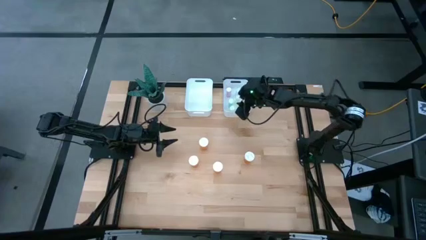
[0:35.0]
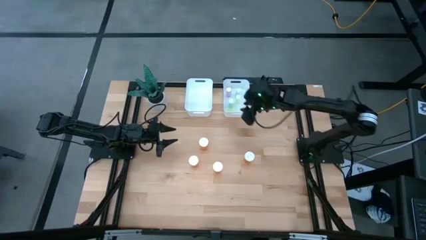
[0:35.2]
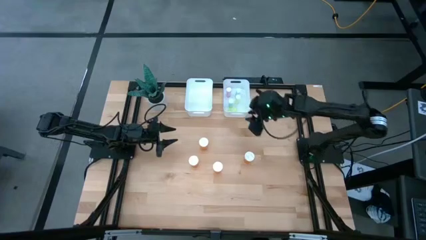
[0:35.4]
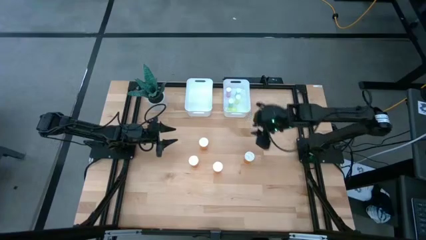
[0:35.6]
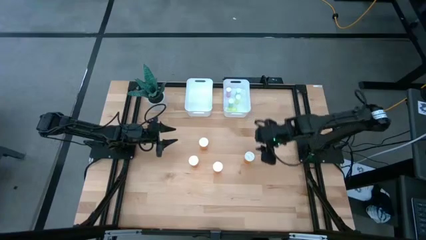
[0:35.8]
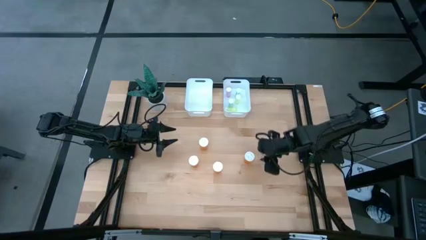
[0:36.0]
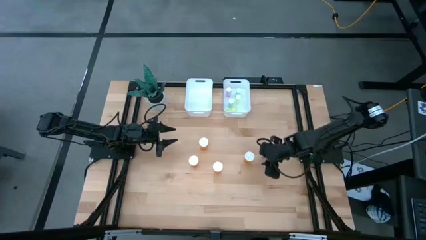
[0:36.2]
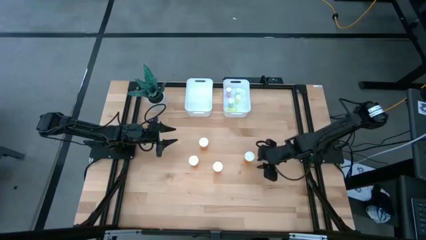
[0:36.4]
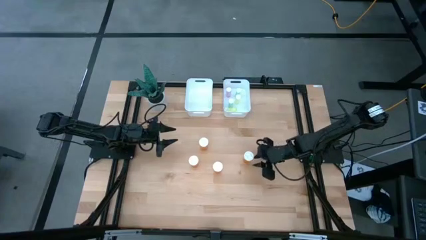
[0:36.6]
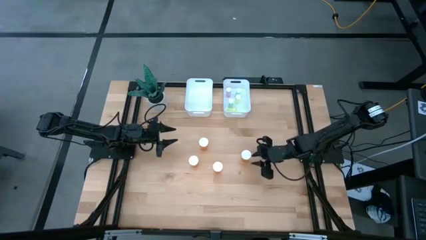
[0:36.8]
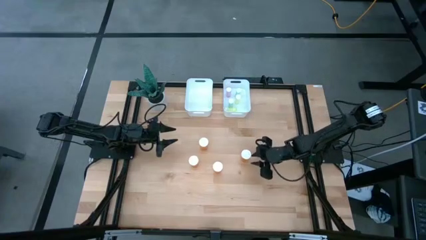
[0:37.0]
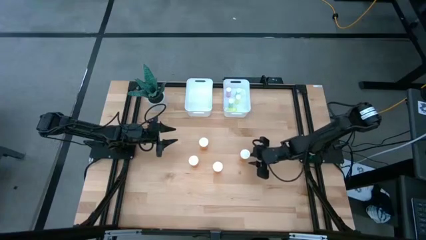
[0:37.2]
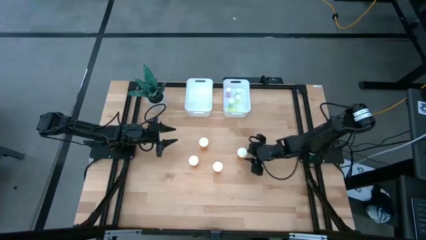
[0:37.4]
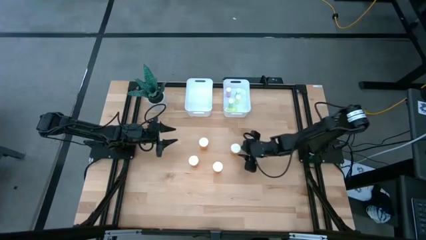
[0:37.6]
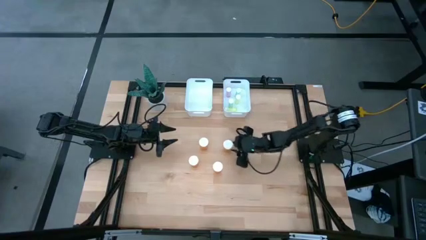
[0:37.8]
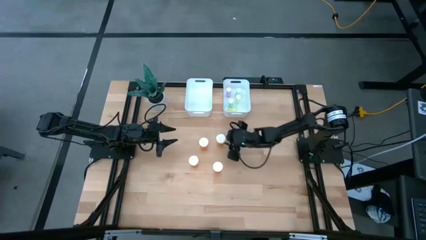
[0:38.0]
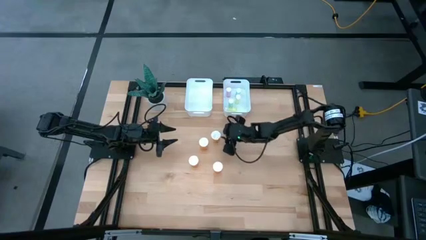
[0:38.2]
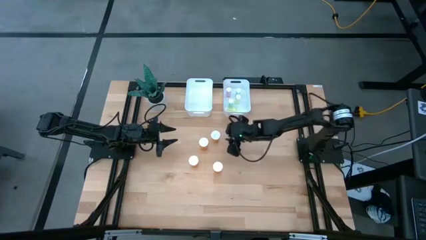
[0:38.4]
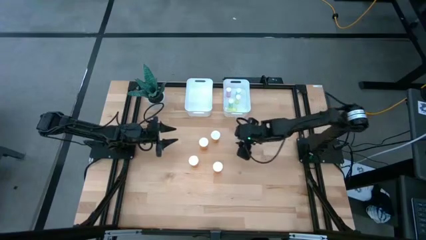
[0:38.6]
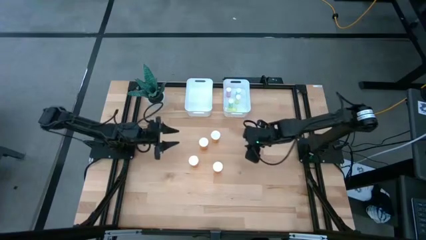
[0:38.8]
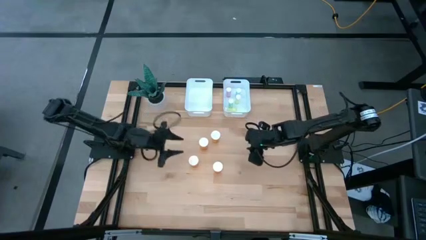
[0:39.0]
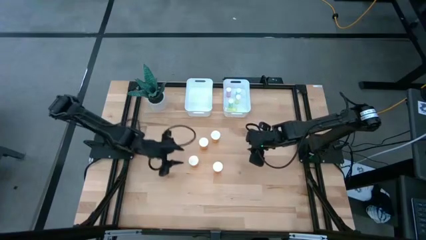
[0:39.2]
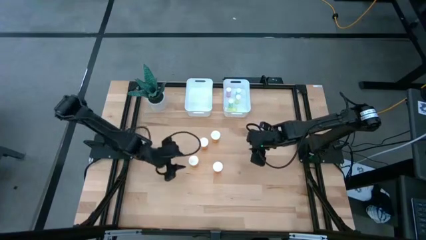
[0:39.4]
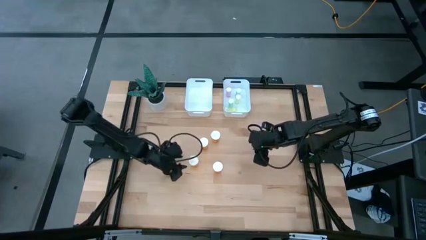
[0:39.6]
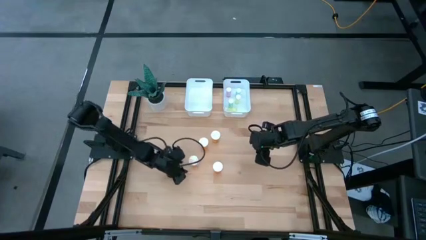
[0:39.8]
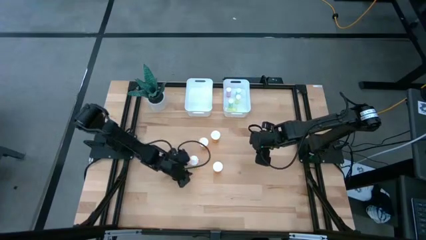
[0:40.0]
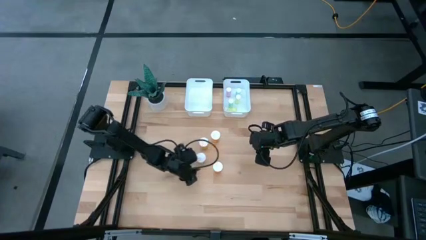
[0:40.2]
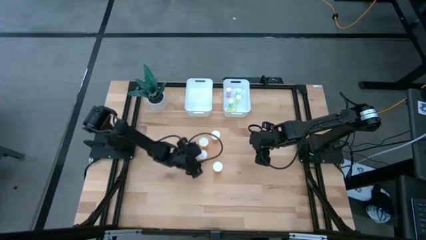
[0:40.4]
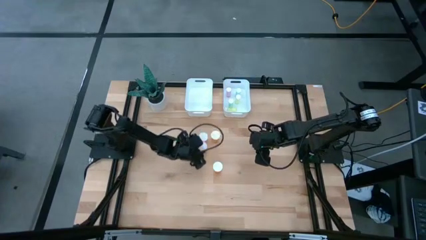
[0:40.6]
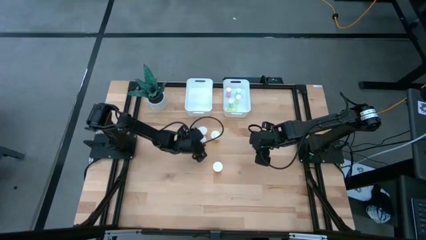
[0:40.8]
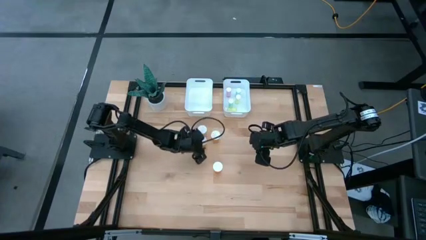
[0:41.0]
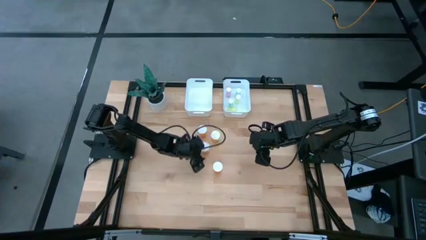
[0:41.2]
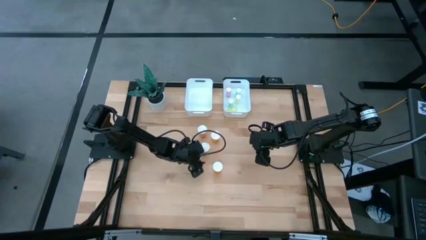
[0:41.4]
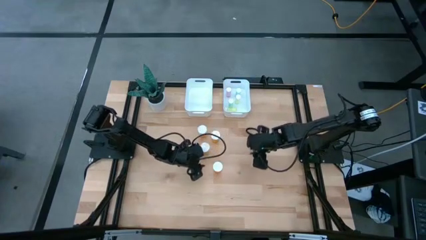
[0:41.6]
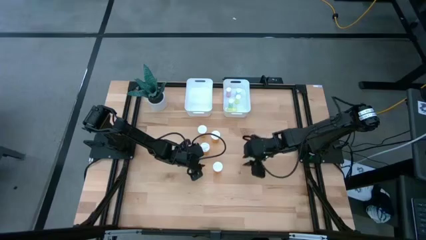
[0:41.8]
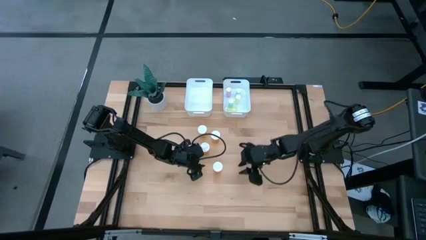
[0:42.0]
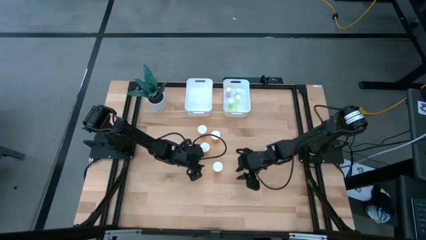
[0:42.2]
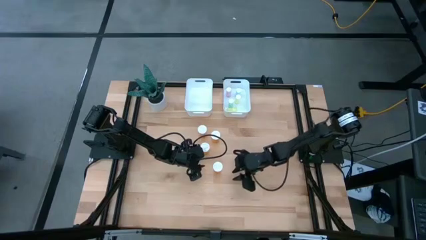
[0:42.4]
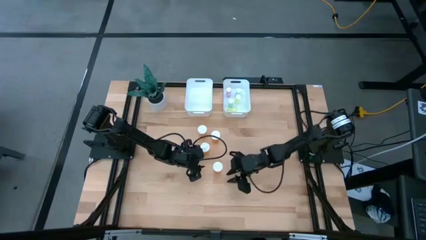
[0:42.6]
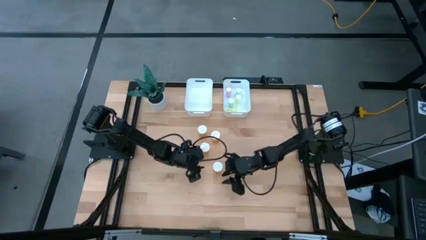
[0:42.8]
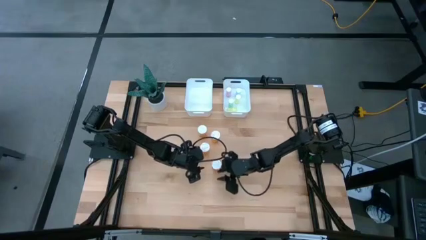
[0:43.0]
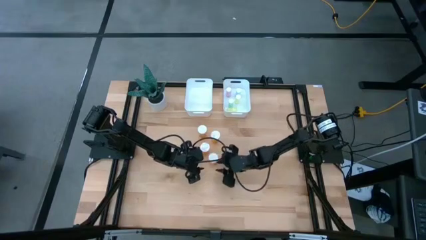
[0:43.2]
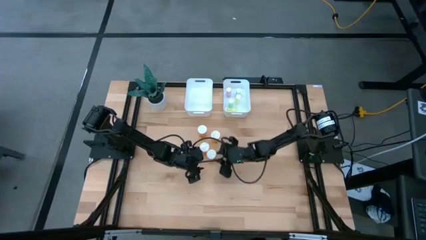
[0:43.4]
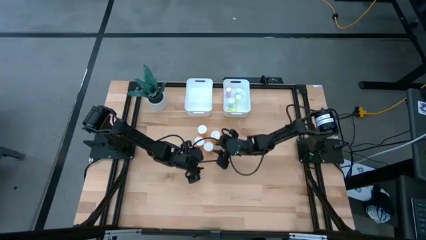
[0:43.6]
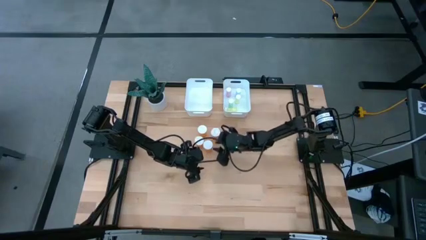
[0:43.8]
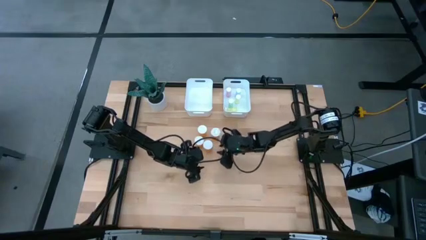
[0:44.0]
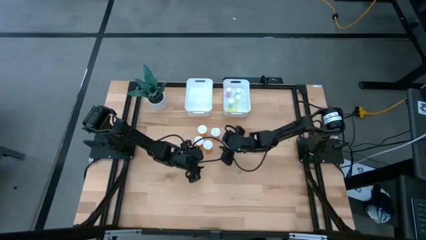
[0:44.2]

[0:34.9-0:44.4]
Task: Pick and place medicine bottles into bin by pill shape (circle, oval)
Move the large orange pill bottle to the center of the table

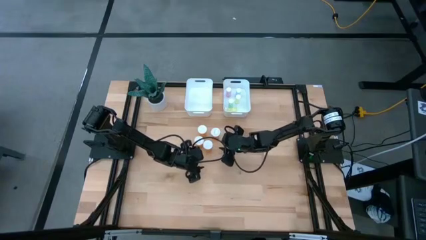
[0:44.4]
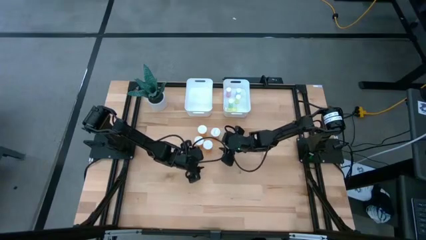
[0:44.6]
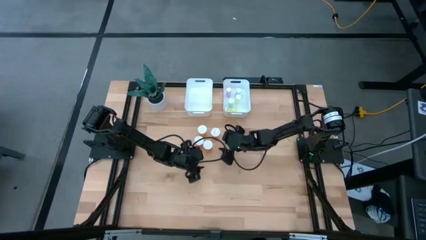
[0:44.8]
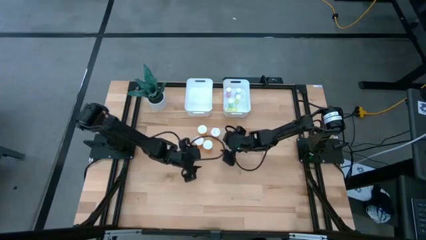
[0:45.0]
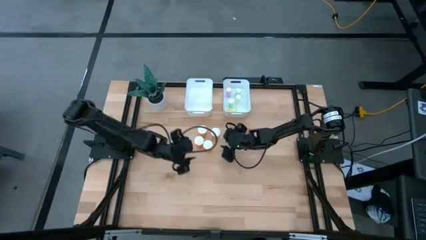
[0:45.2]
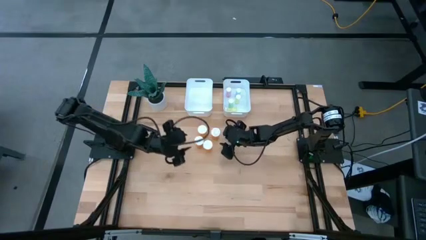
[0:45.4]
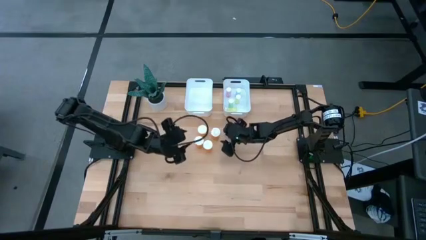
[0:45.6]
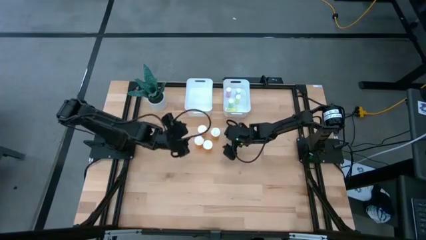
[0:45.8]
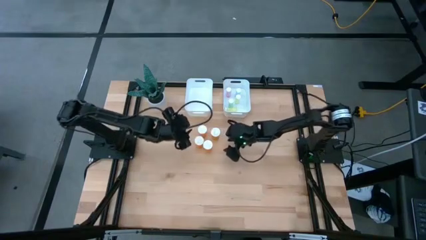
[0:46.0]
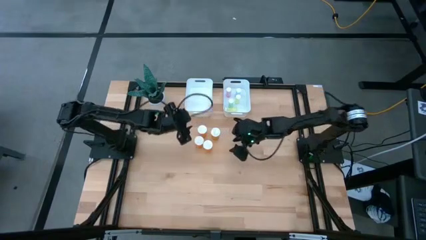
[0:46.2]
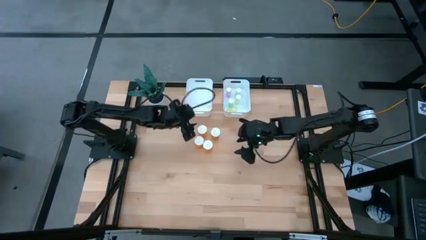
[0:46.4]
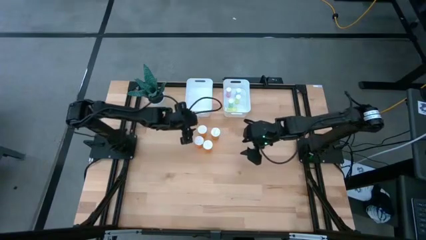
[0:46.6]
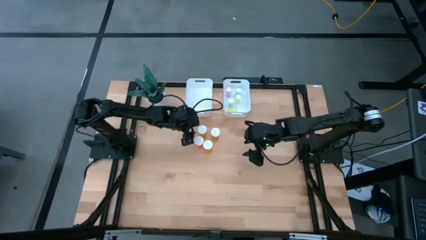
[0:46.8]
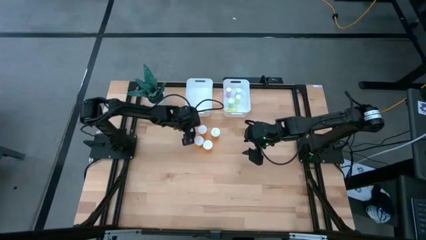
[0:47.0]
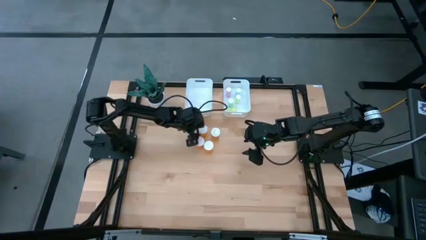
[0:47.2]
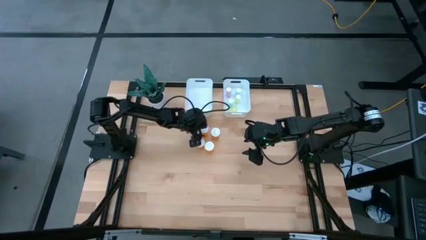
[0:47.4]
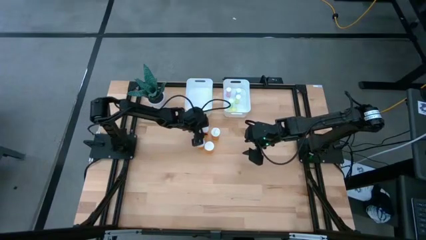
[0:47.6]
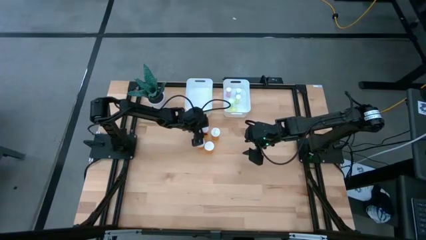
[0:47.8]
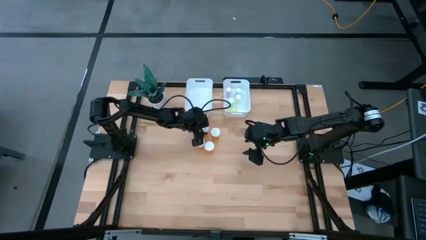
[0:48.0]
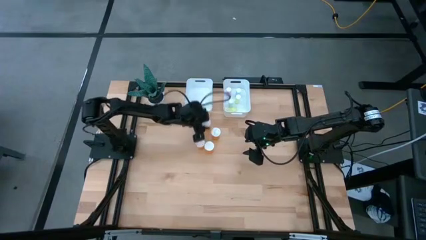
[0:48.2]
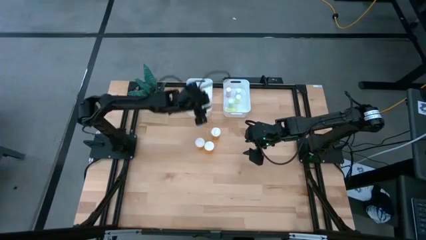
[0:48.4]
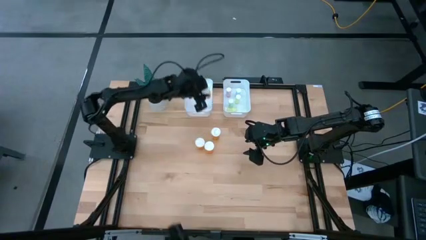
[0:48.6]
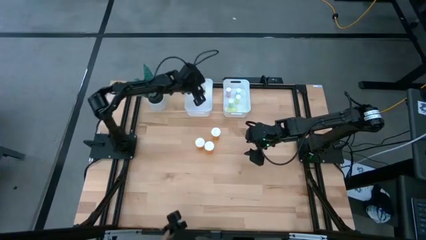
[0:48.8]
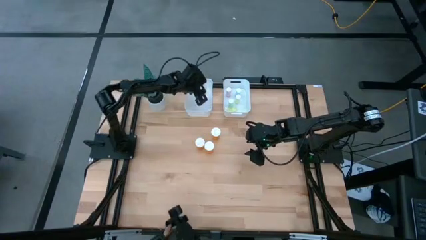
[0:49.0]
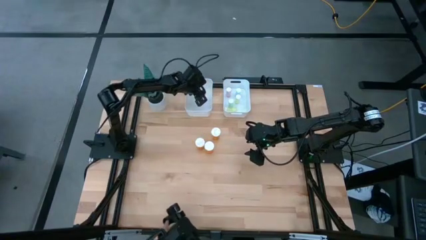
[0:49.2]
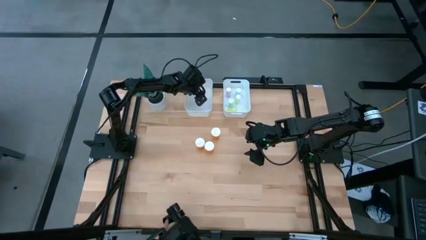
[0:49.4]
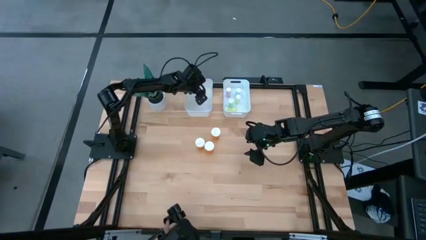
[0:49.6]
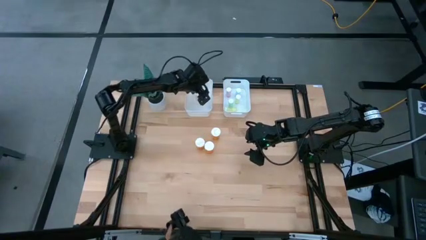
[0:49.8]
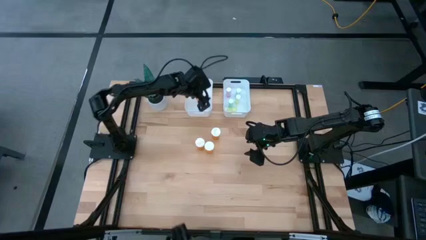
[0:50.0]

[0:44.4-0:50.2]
Put the large orange pill bottle into the left white bin

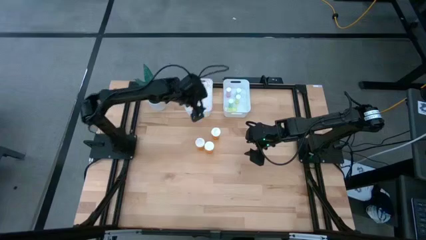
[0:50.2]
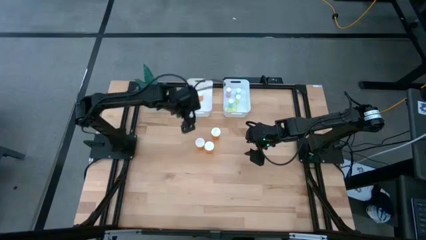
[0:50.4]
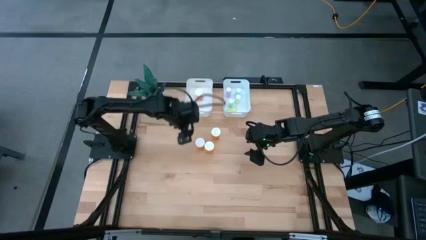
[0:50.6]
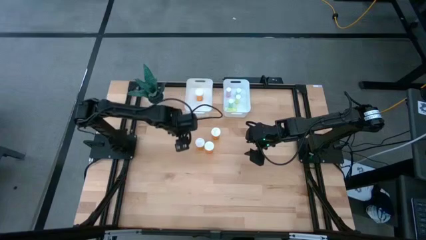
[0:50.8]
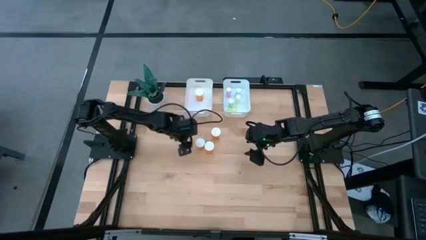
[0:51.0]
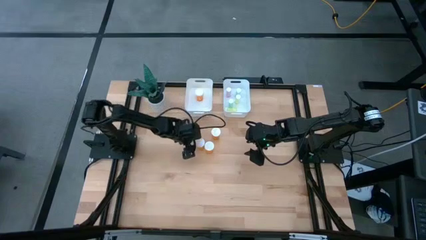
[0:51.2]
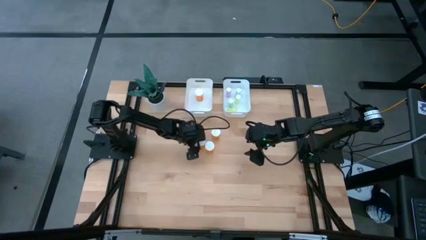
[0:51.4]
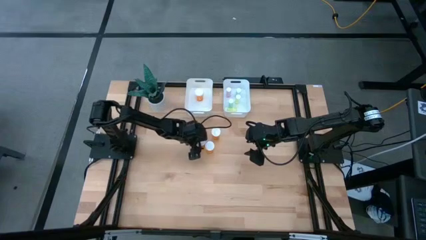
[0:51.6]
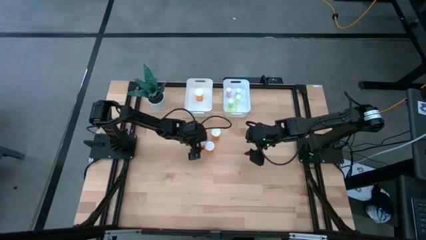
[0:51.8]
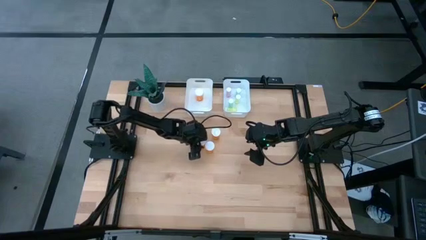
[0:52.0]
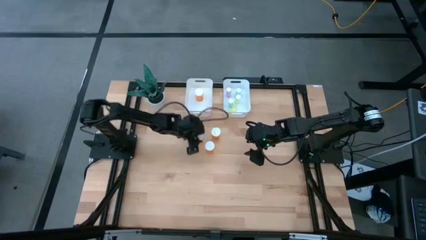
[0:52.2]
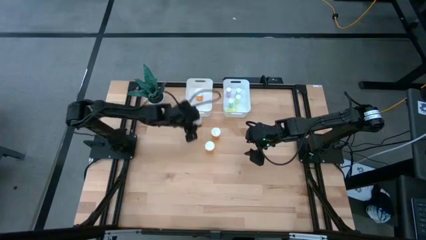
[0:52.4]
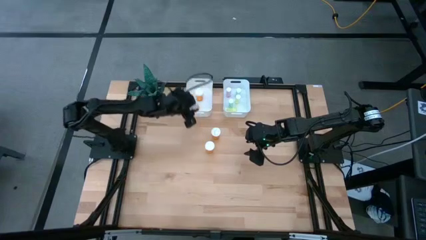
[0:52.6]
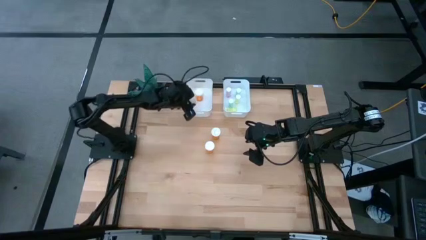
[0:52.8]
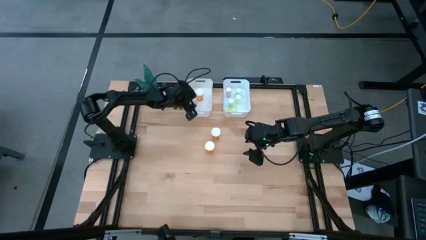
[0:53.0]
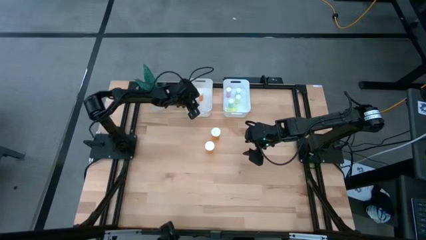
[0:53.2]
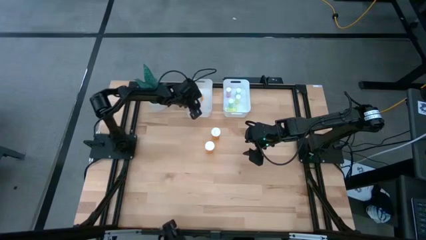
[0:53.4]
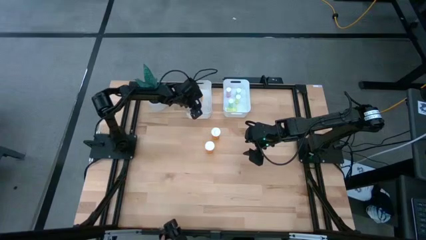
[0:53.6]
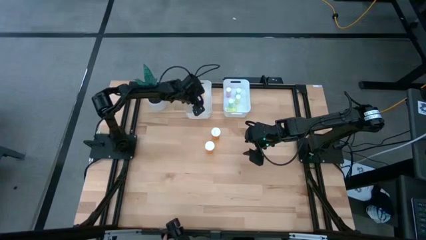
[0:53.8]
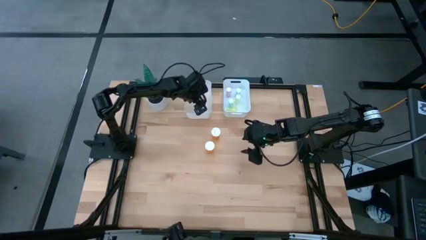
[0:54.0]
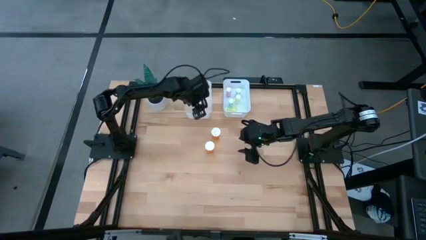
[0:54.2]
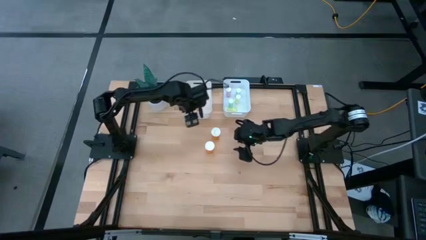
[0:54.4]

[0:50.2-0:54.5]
Put the large orange pill bottle into the left white bin
